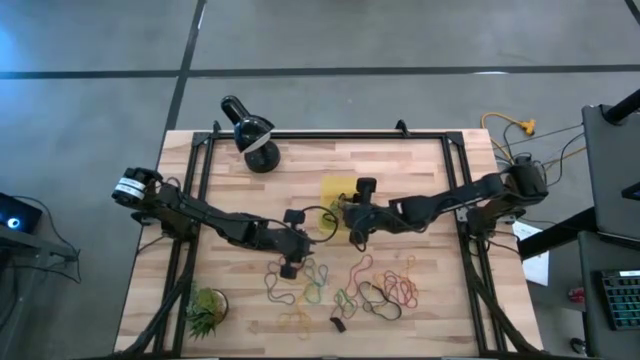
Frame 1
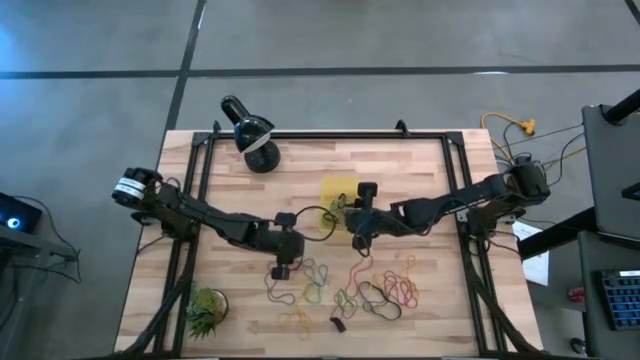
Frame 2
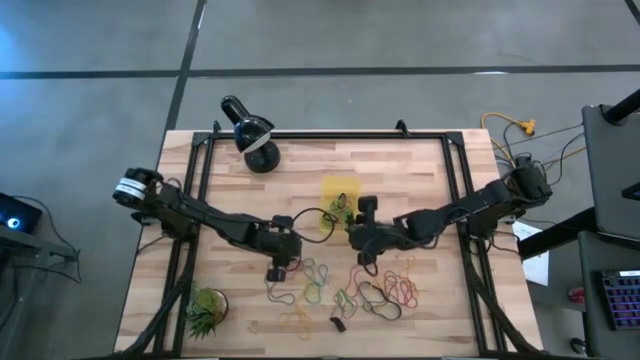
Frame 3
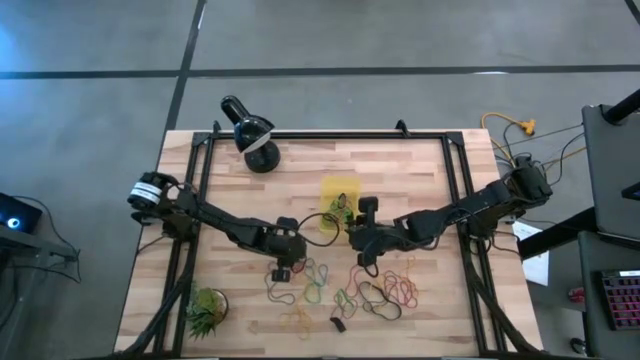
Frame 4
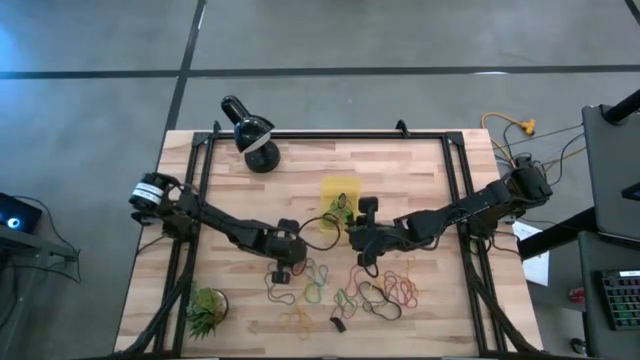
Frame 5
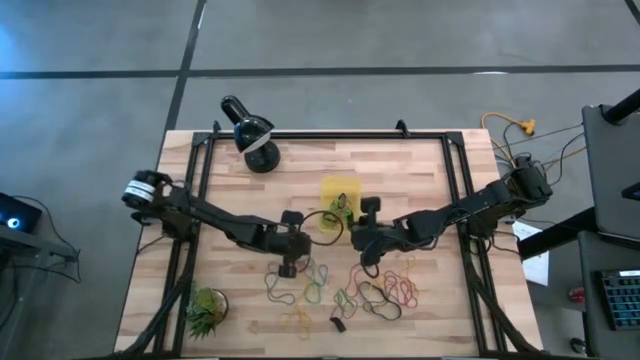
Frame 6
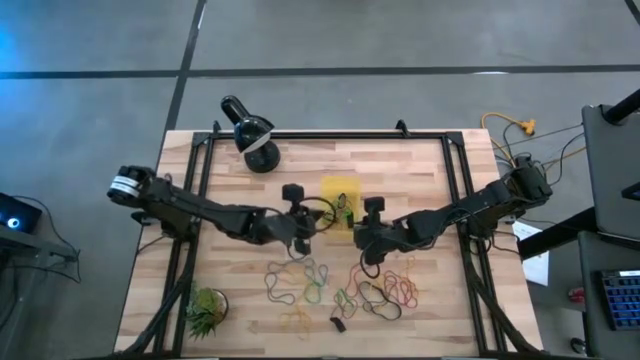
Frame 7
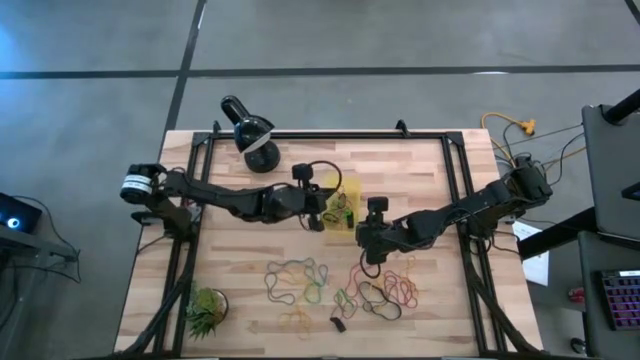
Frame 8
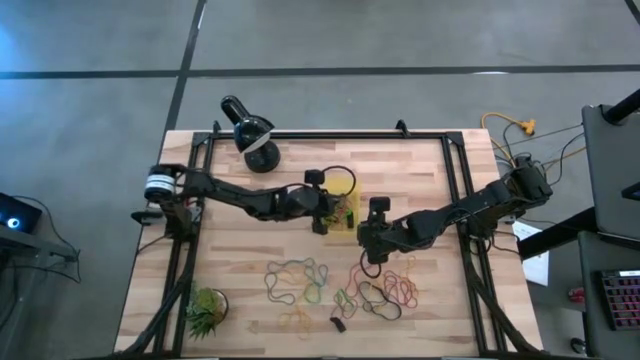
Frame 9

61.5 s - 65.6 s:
Task: Pick and place rubber bands into bin
Put the red rubber band into the yellow bin

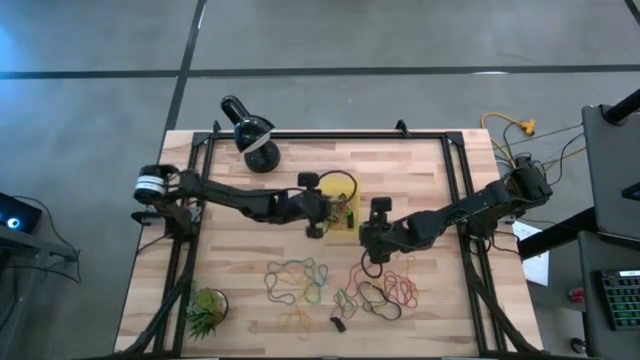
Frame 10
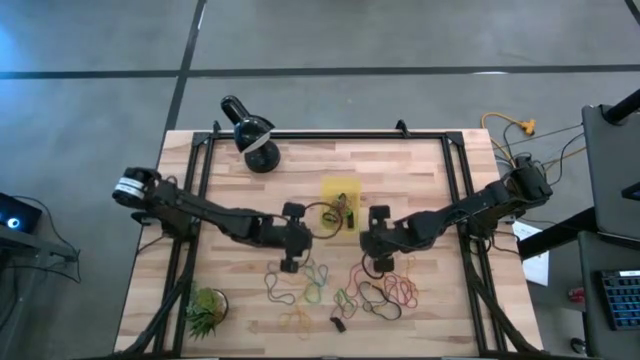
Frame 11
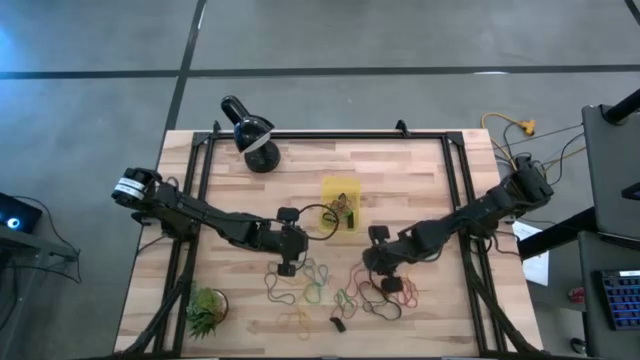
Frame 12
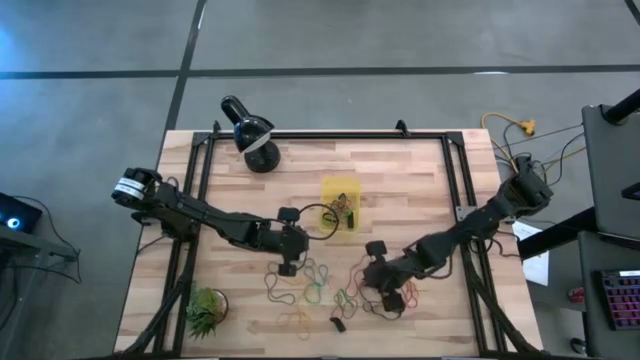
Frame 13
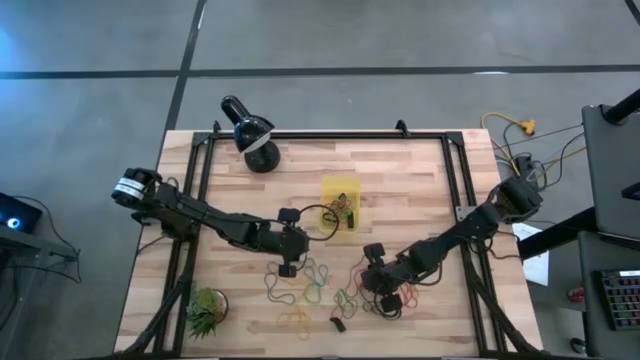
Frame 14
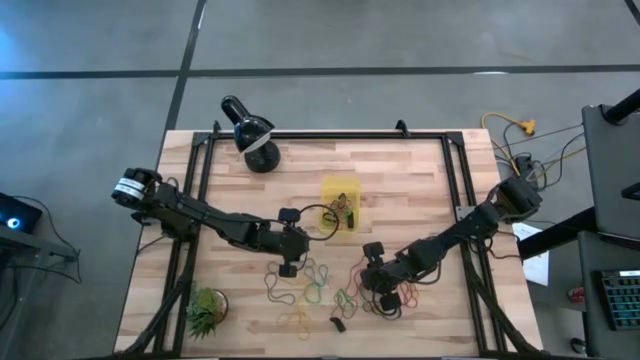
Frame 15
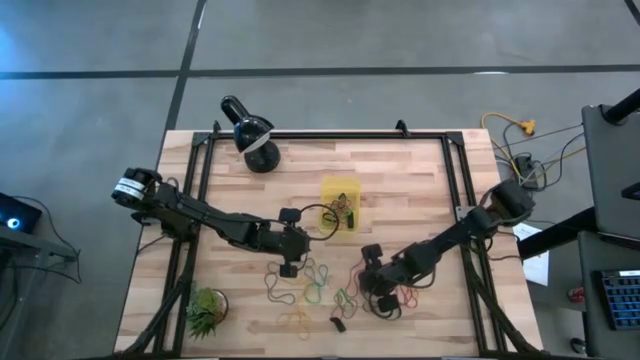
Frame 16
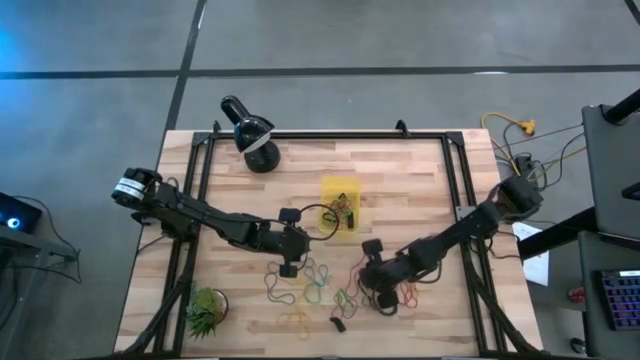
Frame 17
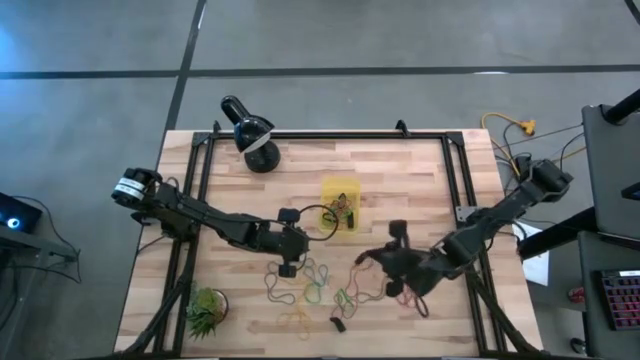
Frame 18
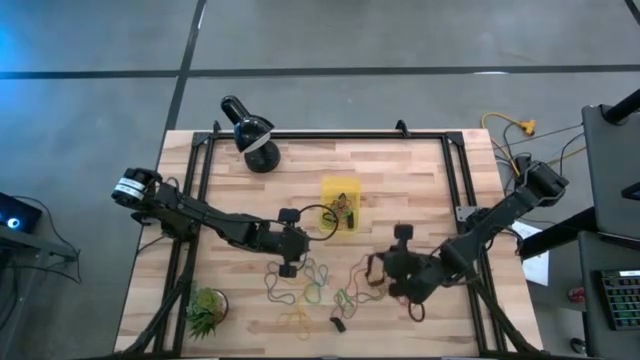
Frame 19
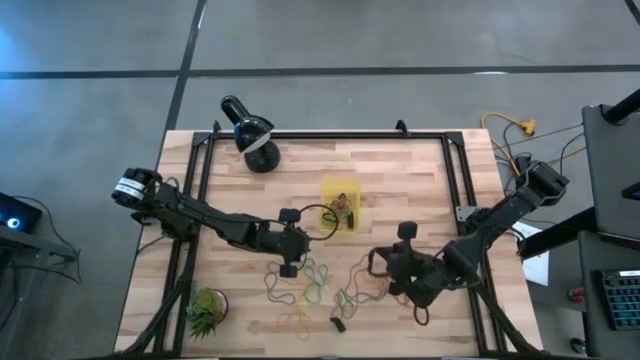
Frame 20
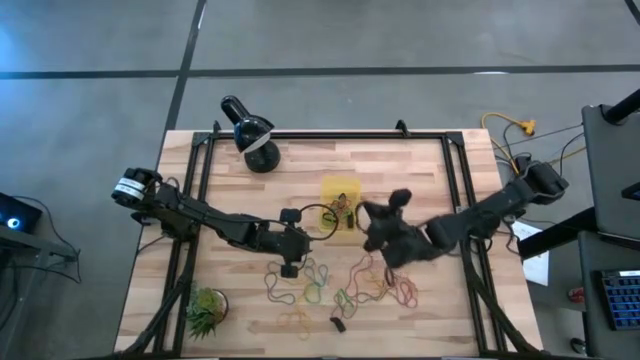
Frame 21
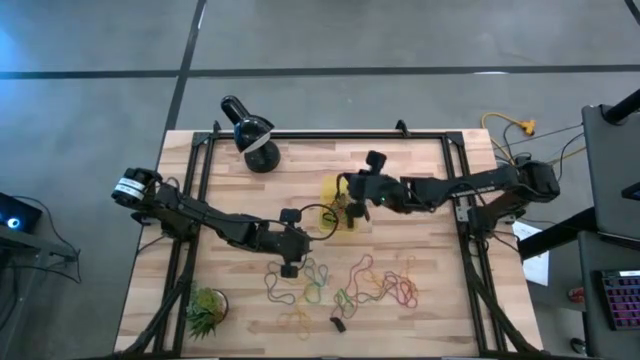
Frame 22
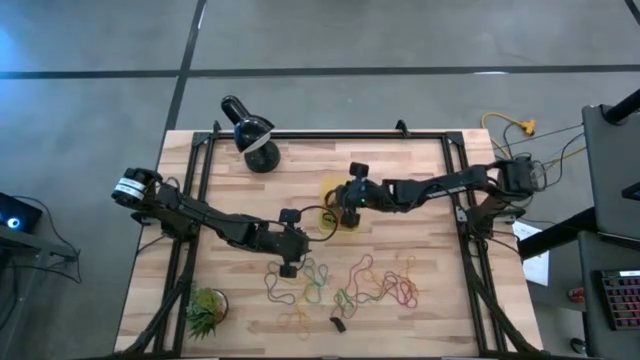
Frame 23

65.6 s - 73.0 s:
Put the black rubber band into the yellow bin

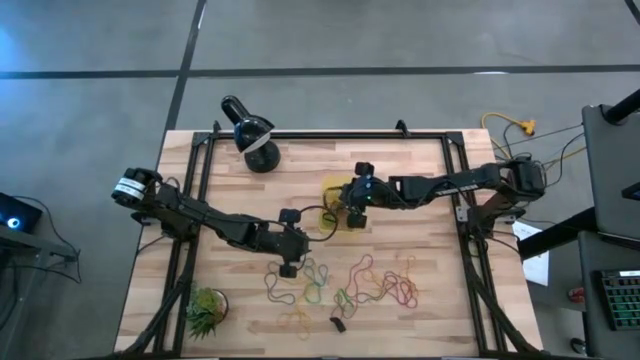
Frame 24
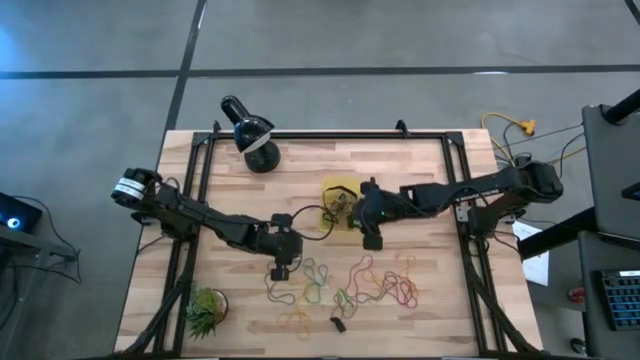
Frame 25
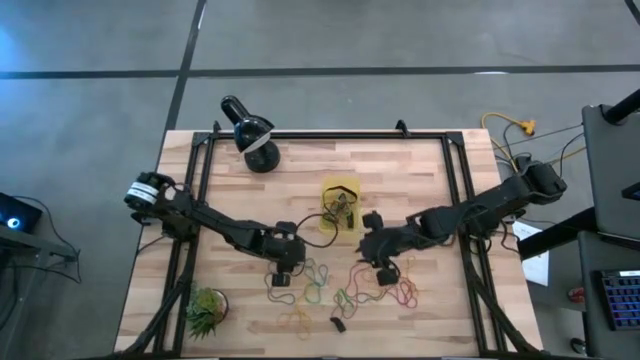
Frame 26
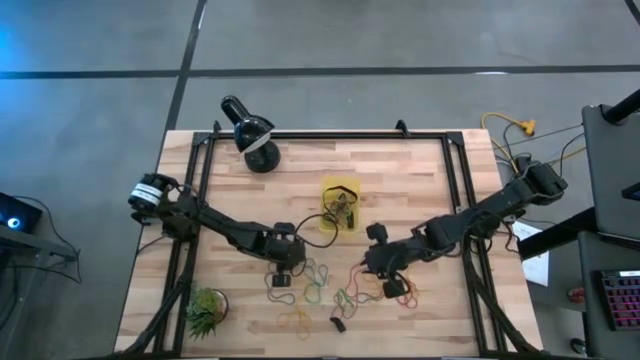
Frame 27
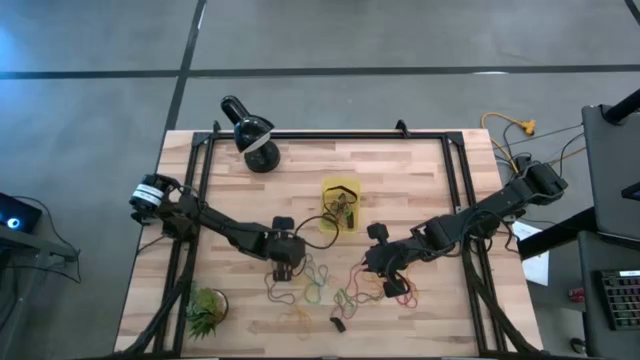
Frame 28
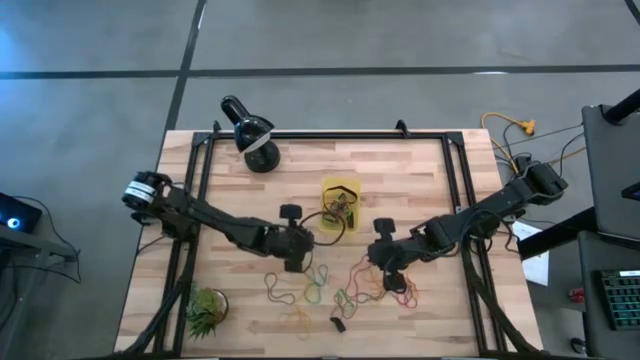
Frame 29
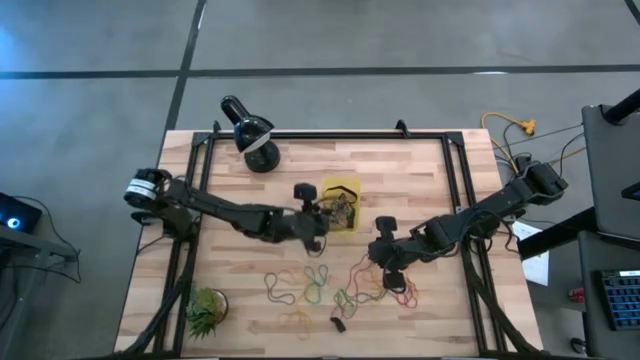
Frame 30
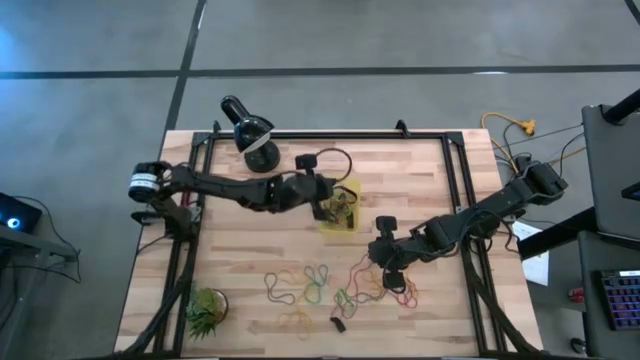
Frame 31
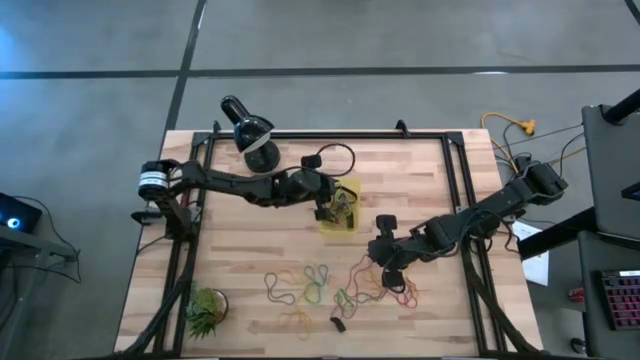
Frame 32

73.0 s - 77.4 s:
Put the blue rubber band into the yellow bin

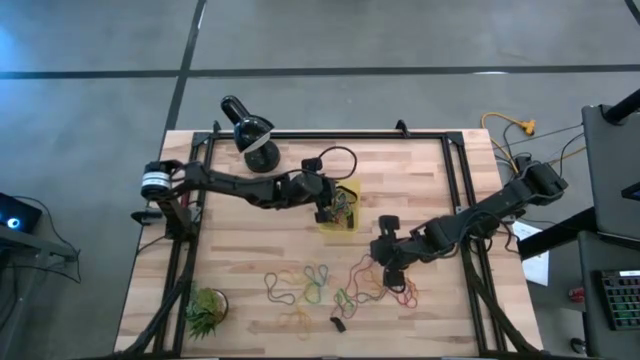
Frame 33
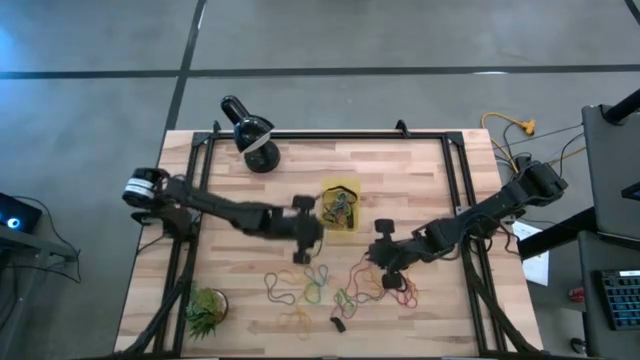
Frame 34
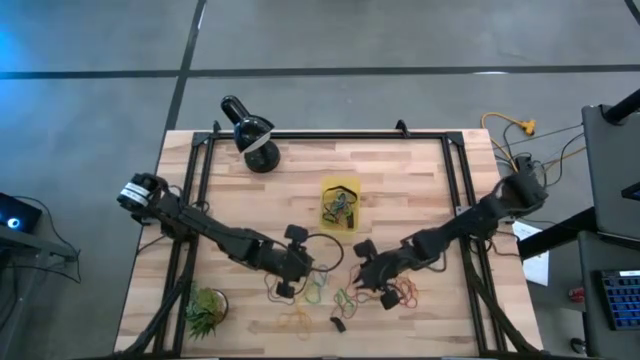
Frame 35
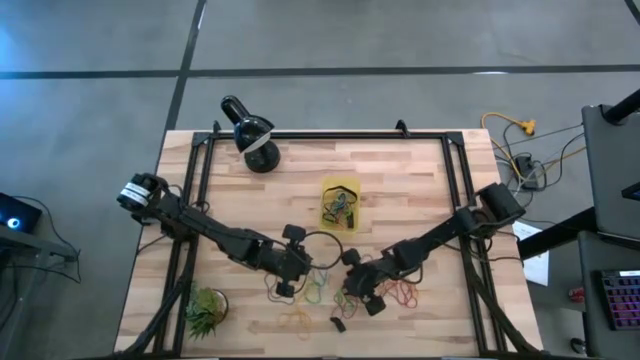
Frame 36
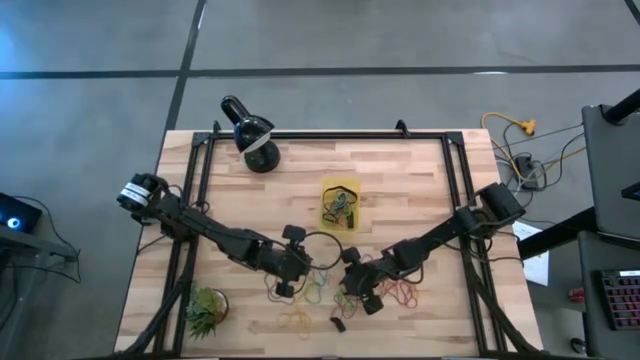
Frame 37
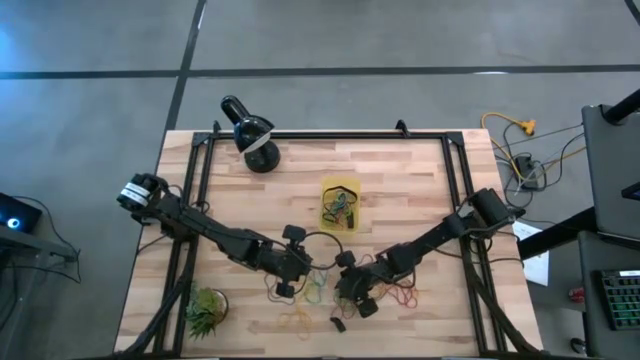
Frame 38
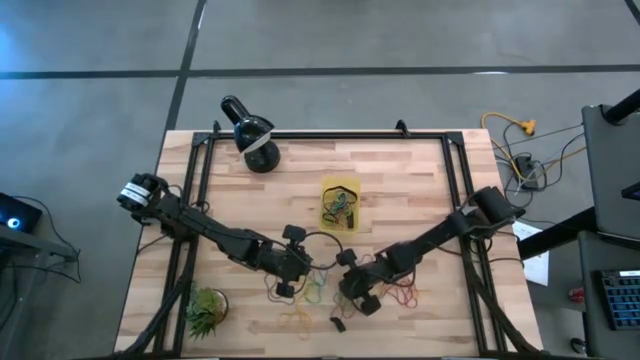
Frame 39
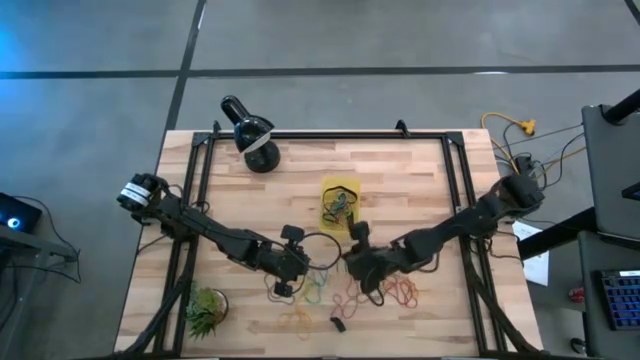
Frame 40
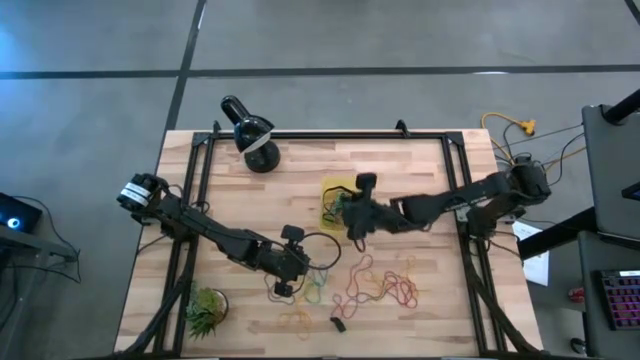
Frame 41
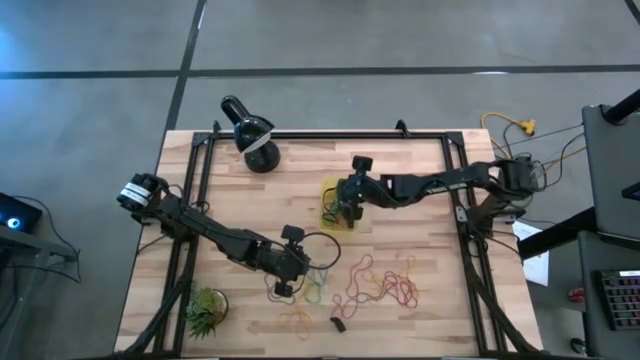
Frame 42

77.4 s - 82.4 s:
Put the green rubber band into the yellow bin

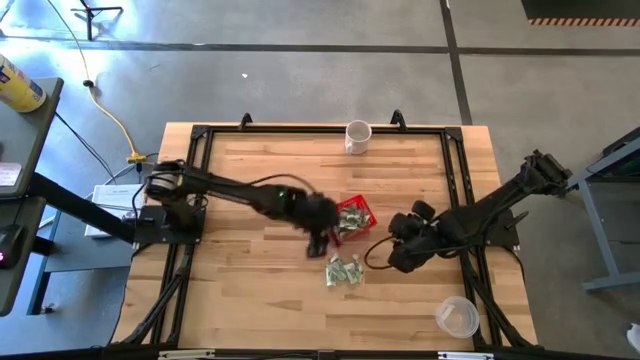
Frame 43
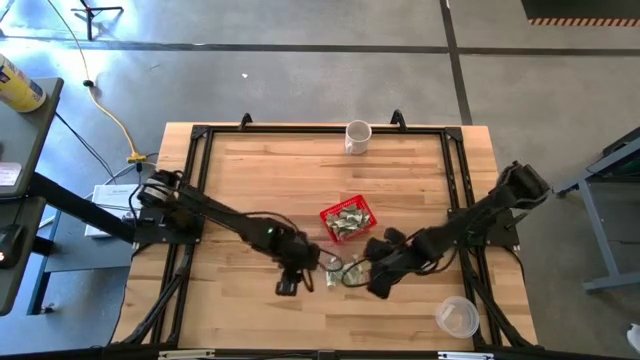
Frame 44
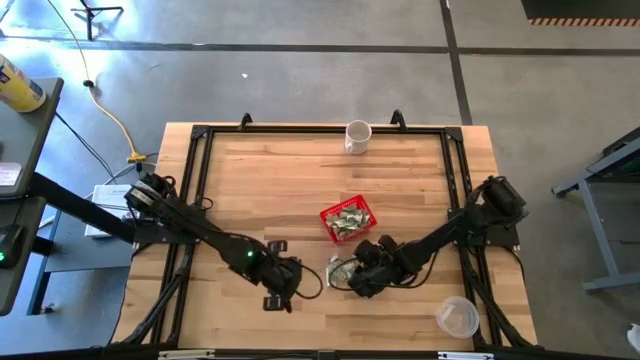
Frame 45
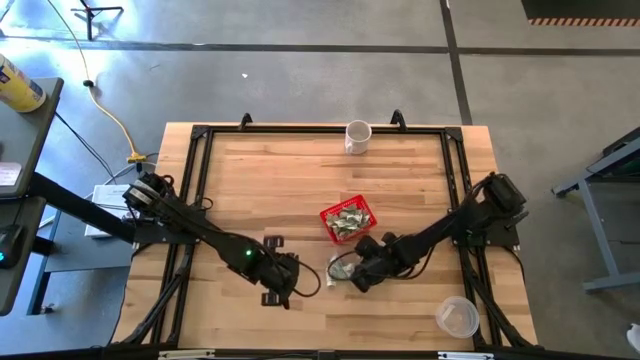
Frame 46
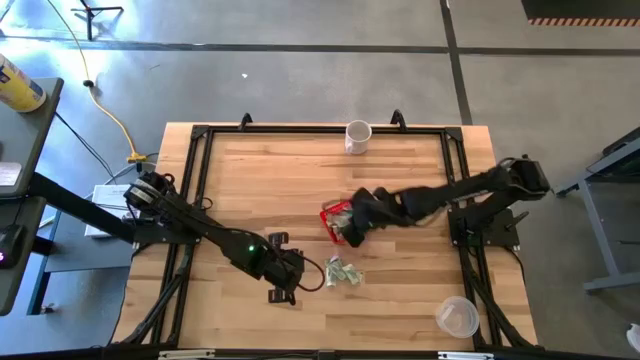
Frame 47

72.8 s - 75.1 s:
Task: Pick and place items into bin
Put the white stevia packet into the red bin
